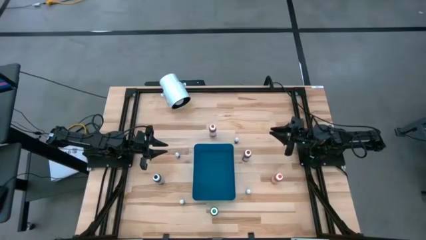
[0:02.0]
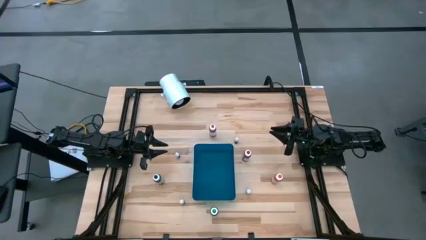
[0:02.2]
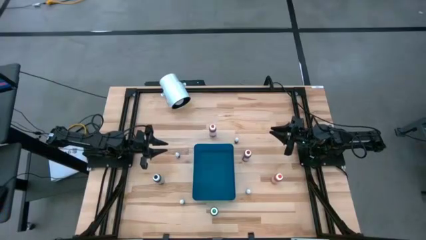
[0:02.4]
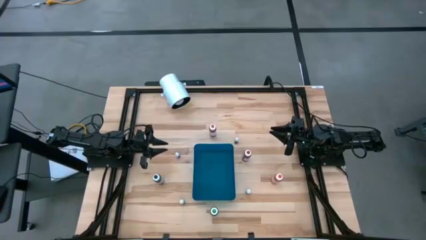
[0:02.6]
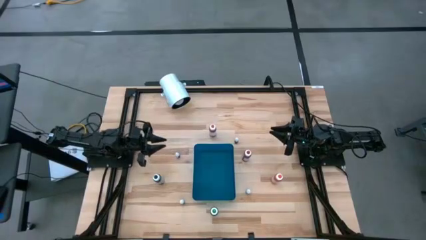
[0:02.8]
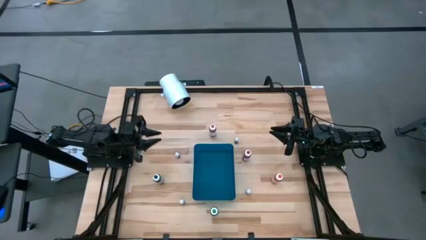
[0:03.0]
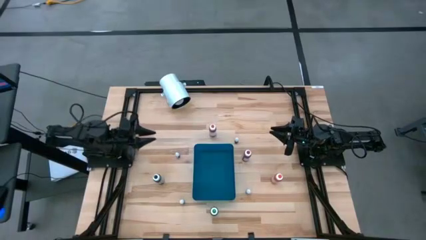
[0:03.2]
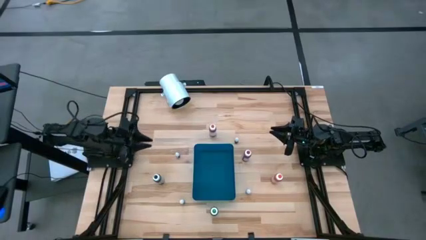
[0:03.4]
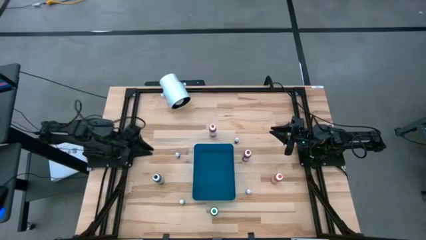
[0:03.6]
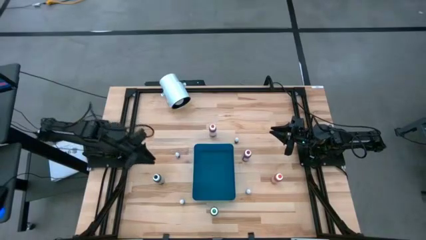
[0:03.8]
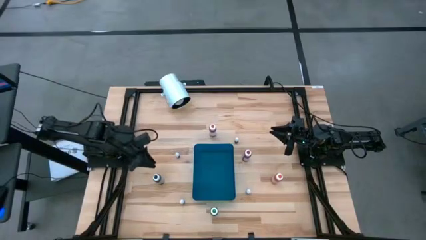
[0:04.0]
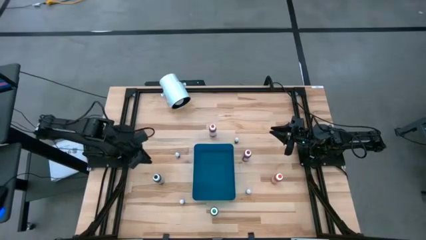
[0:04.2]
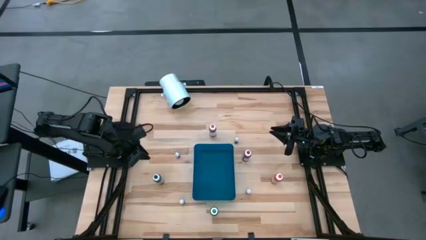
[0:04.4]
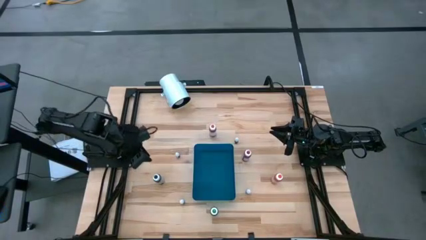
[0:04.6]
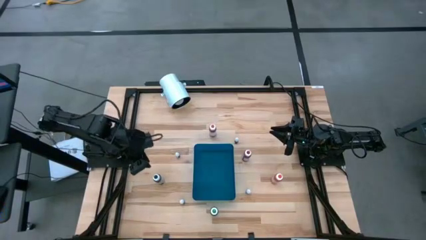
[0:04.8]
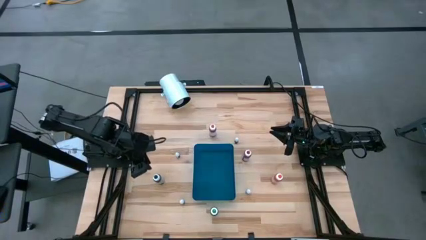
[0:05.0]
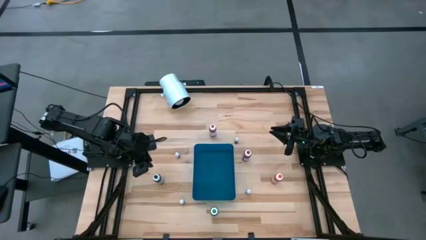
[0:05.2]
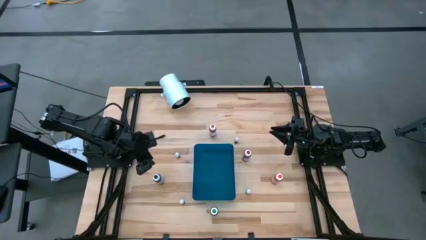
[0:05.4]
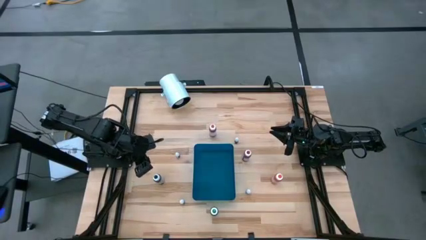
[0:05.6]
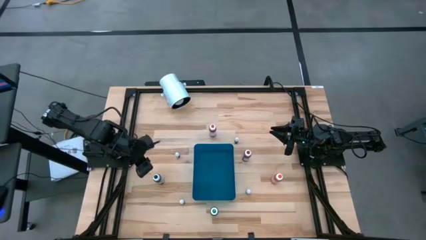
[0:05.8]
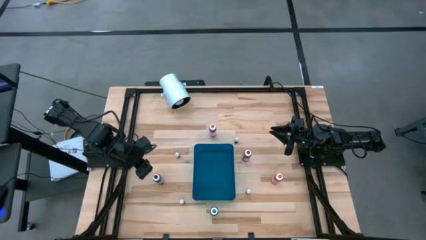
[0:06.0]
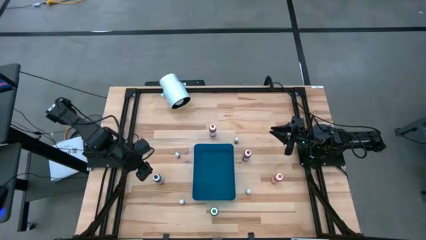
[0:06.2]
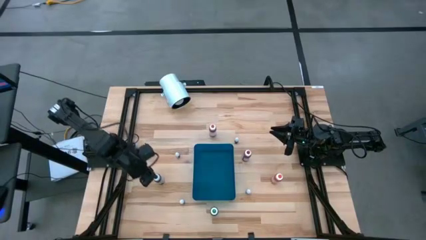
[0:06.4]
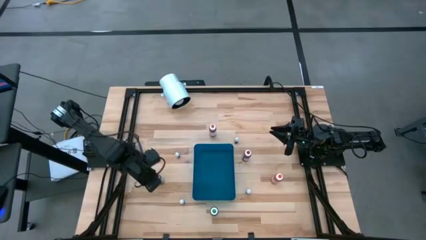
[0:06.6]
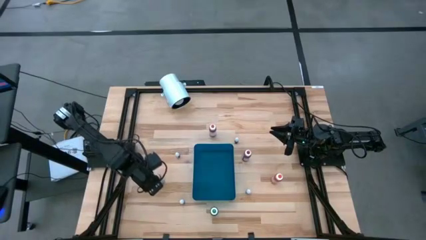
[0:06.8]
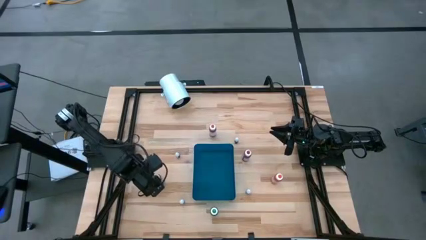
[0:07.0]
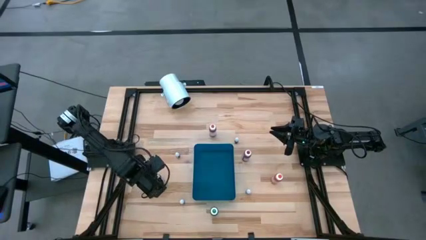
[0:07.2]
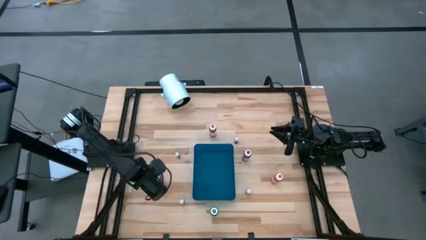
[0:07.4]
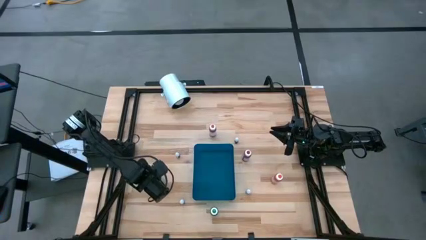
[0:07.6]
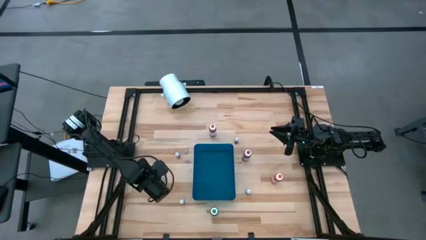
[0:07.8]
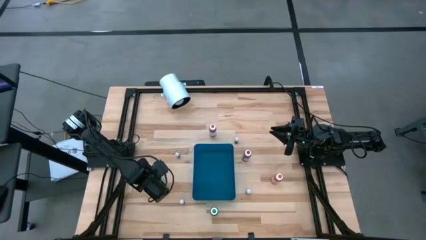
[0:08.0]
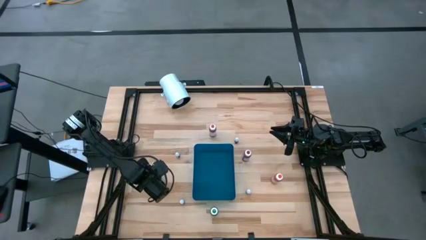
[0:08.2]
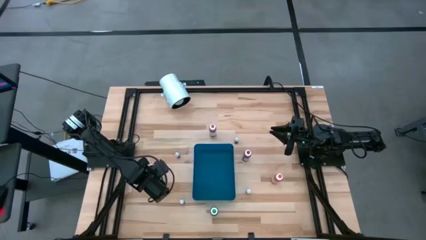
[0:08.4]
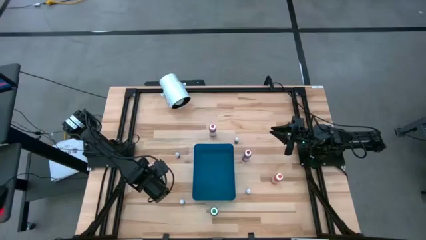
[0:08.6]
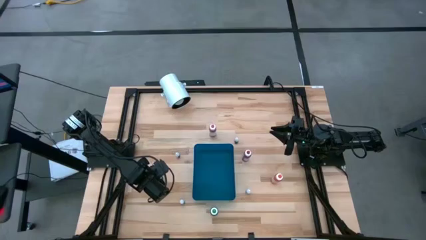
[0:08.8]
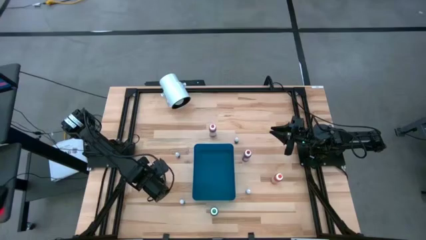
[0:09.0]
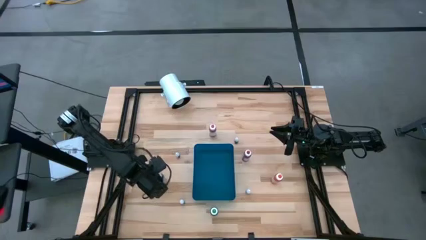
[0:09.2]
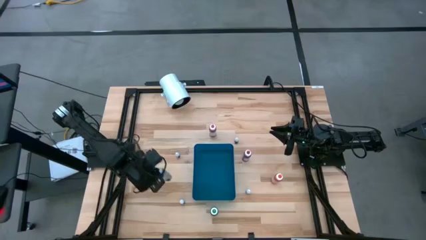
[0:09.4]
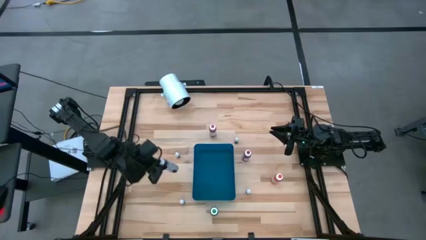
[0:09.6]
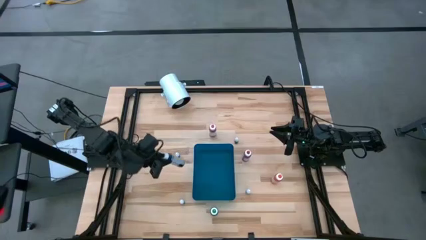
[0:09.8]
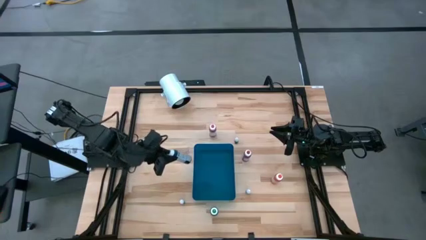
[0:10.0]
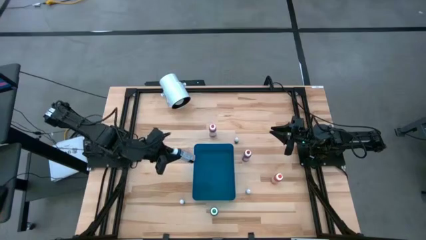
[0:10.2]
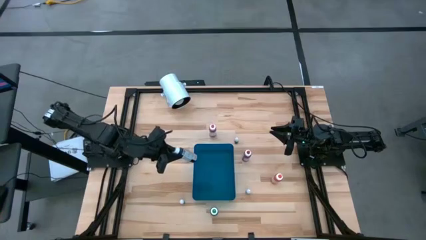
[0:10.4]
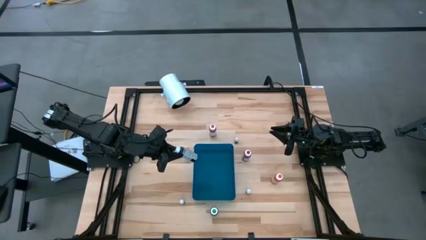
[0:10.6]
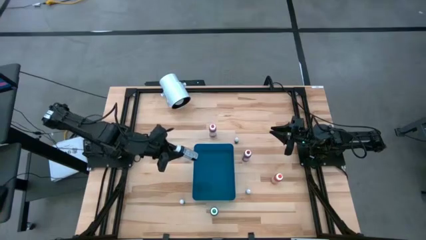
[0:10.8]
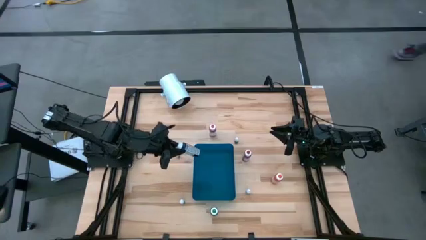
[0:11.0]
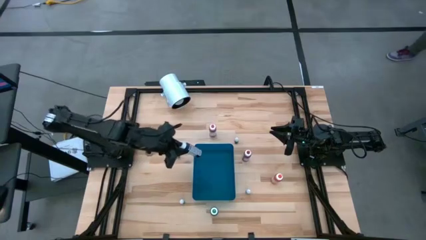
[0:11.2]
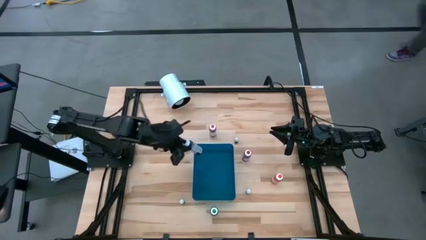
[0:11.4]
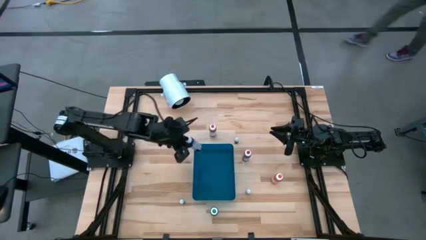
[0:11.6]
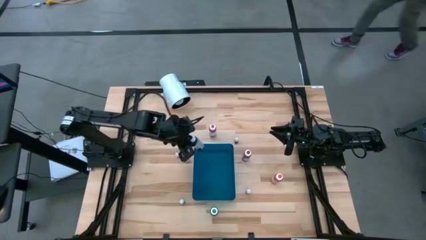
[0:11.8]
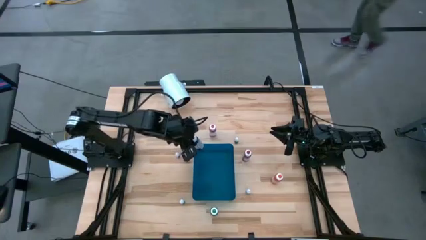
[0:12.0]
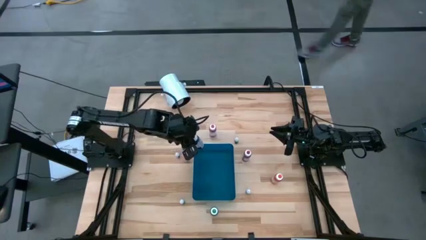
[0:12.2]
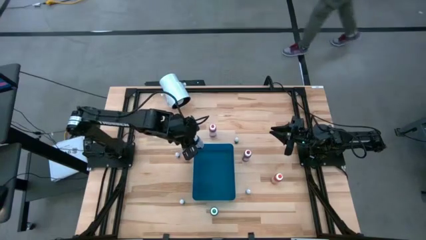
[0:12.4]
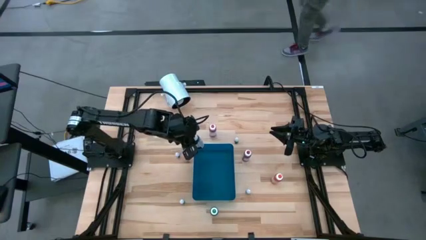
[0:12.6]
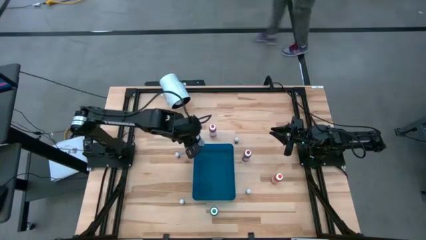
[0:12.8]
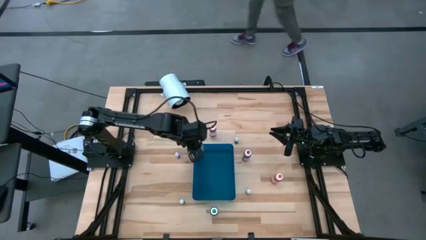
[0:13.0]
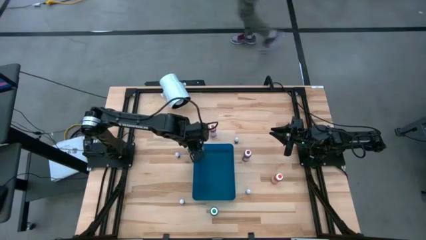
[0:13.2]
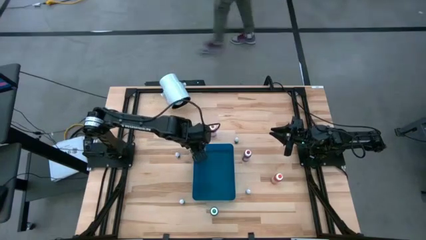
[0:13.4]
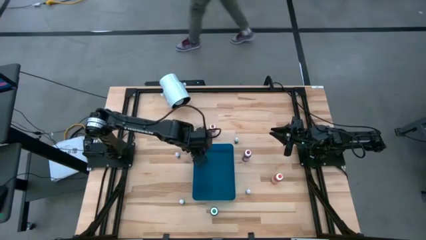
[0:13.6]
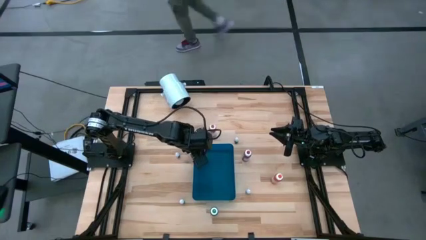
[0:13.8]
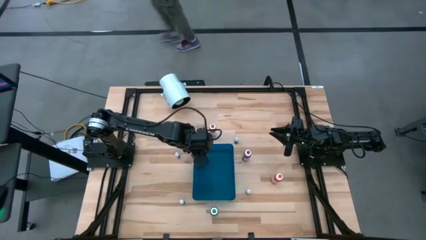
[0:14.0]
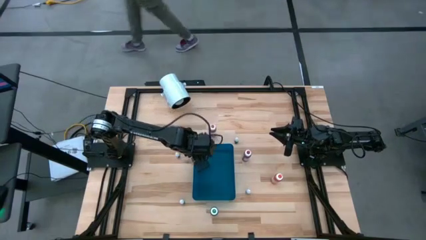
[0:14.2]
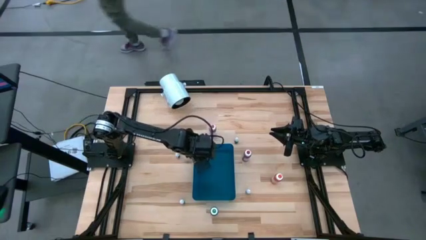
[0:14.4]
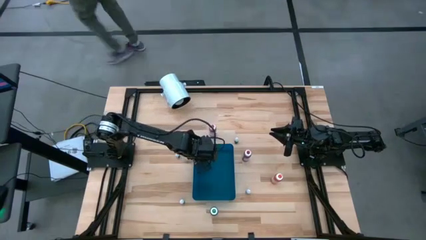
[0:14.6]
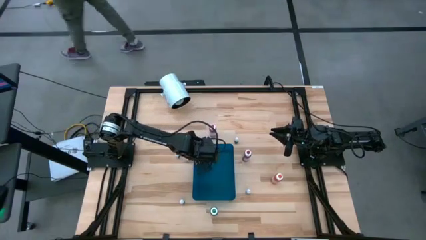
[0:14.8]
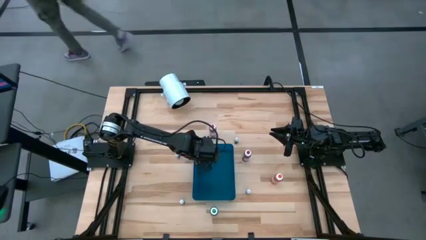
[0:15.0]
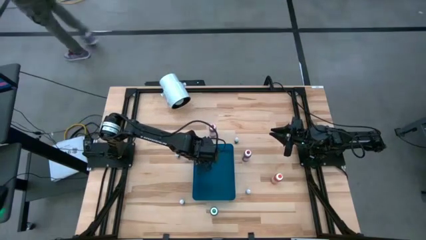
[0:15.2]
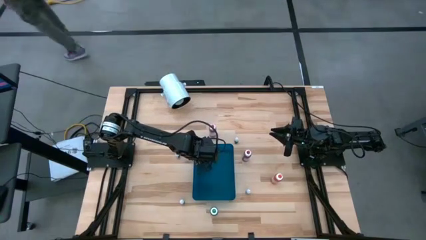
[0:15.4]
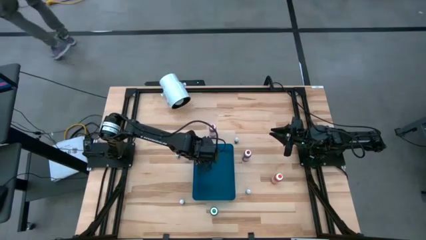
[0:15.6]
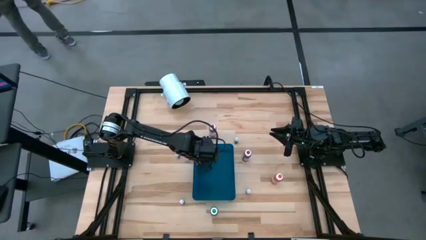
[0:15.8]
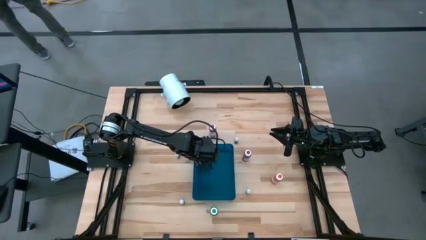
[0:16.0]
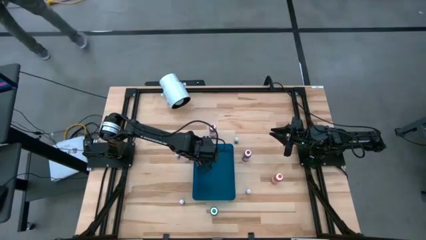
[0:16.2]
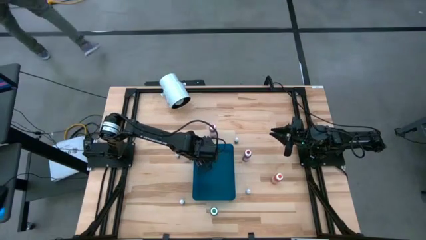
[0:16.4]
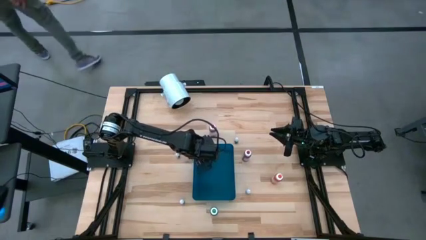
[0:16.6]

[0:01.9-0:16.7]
Task: Pick & Place food coloring
Put the large black food coloring bottle into the blue bin
